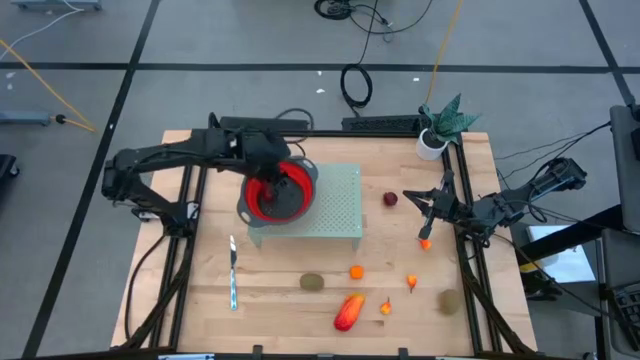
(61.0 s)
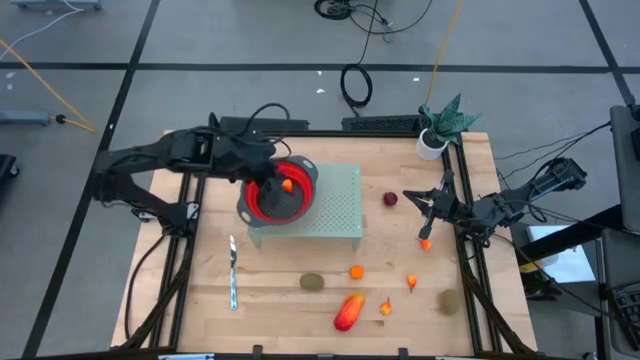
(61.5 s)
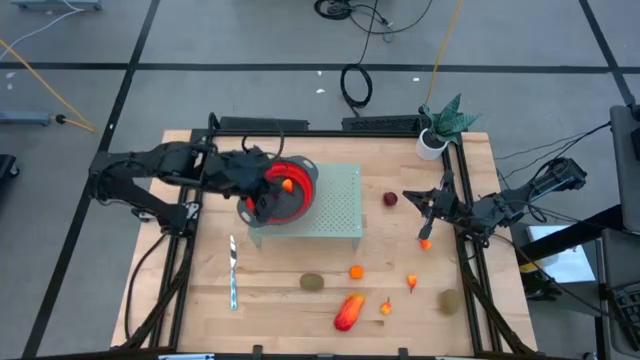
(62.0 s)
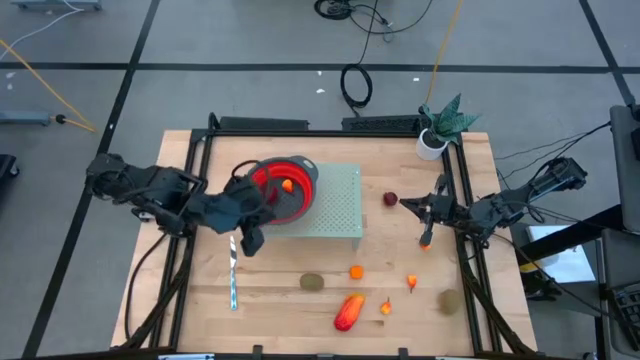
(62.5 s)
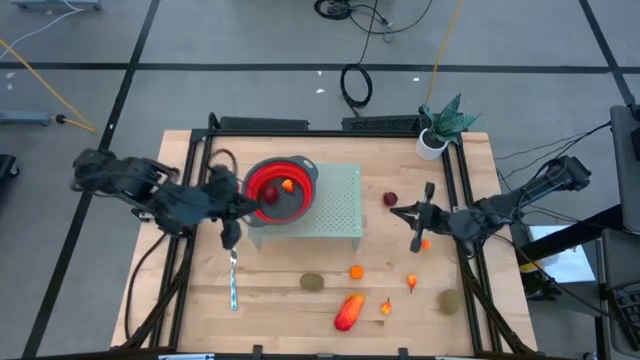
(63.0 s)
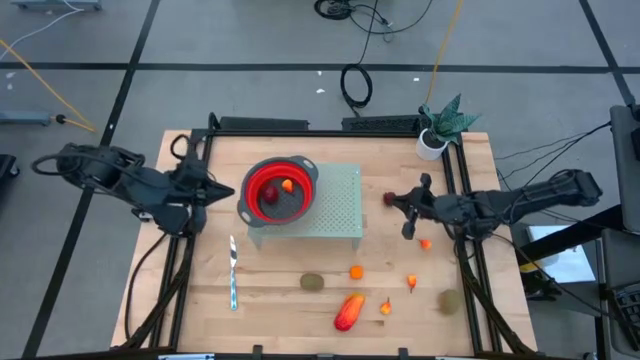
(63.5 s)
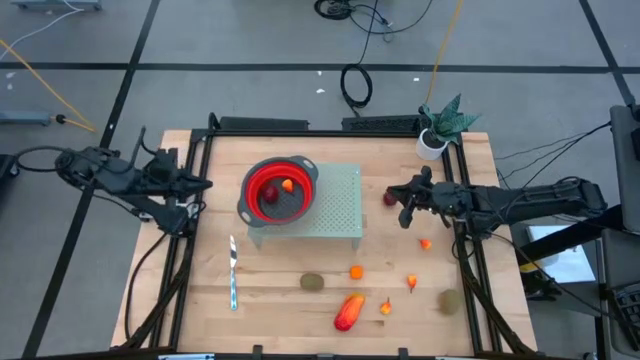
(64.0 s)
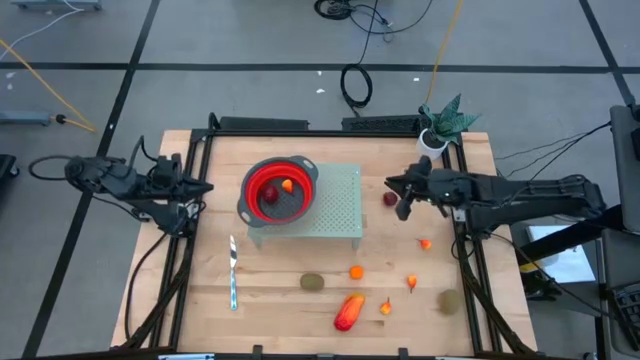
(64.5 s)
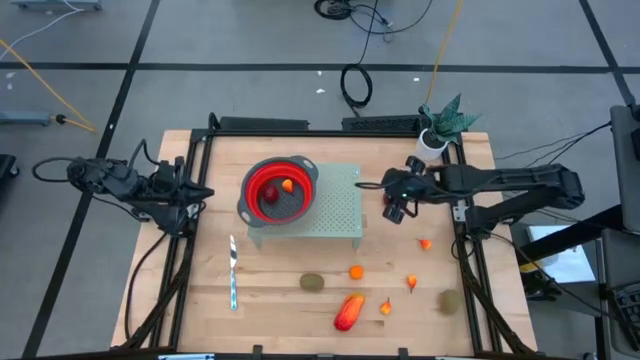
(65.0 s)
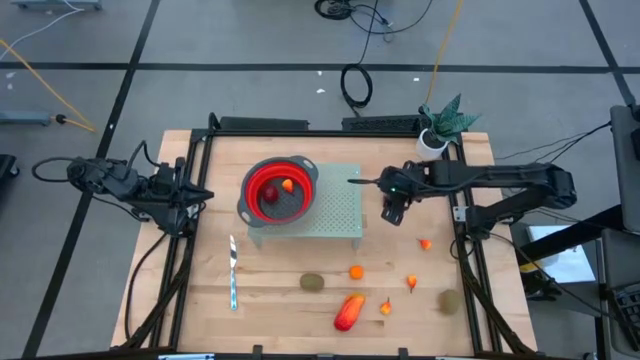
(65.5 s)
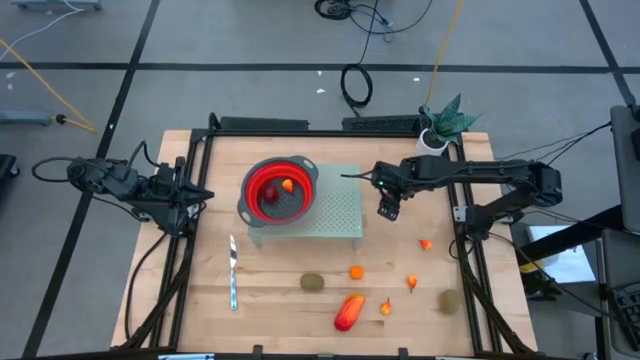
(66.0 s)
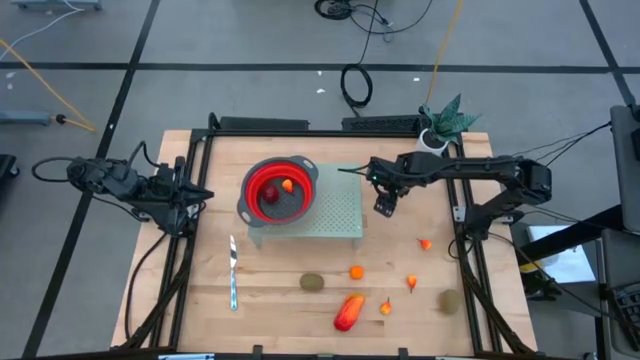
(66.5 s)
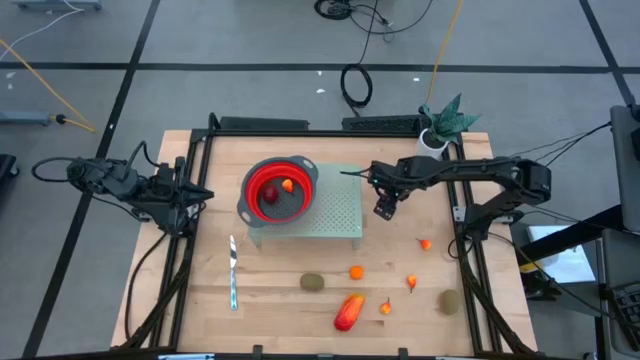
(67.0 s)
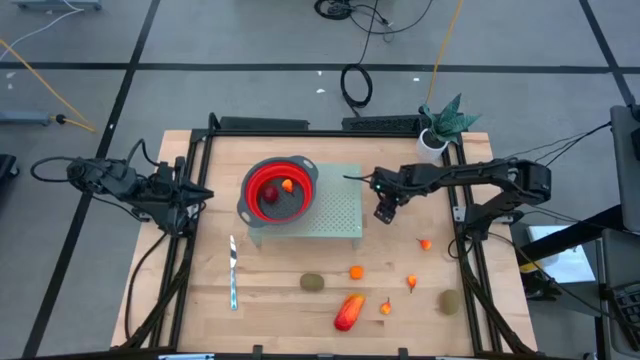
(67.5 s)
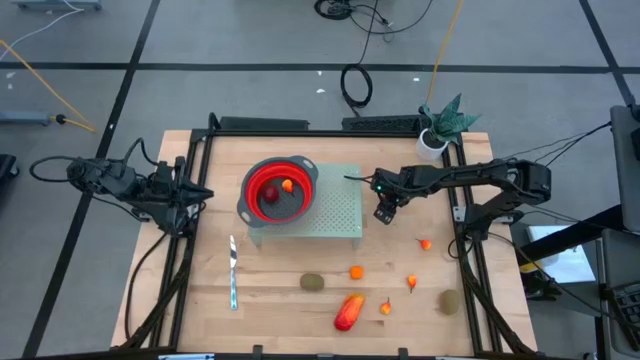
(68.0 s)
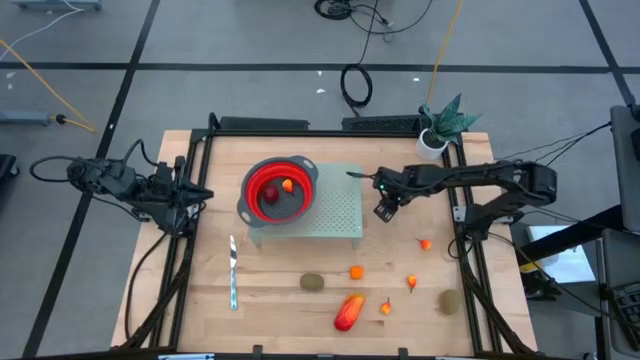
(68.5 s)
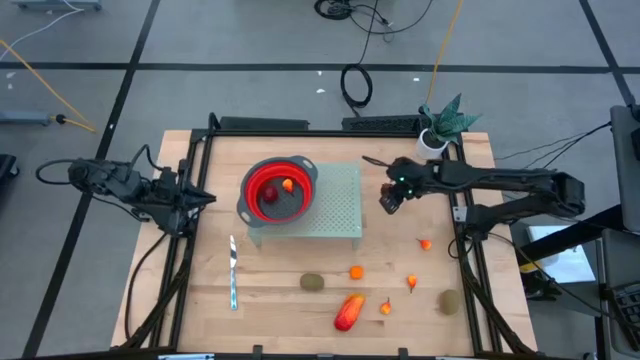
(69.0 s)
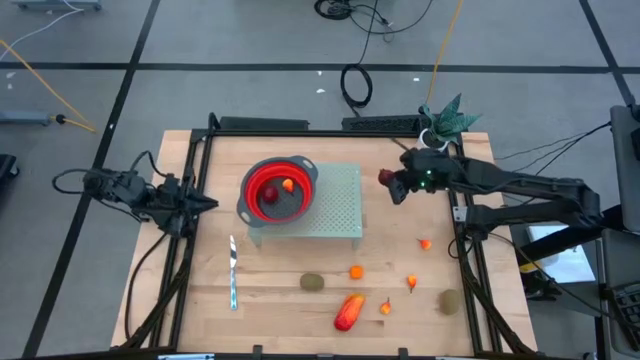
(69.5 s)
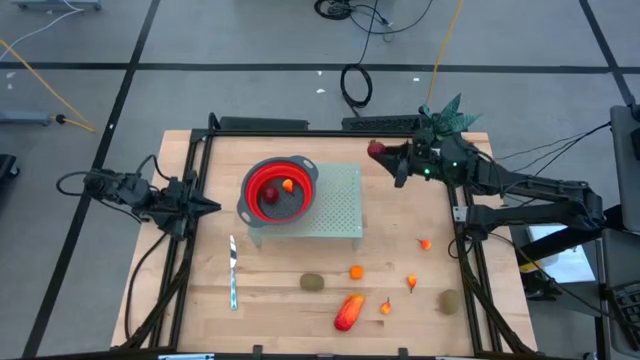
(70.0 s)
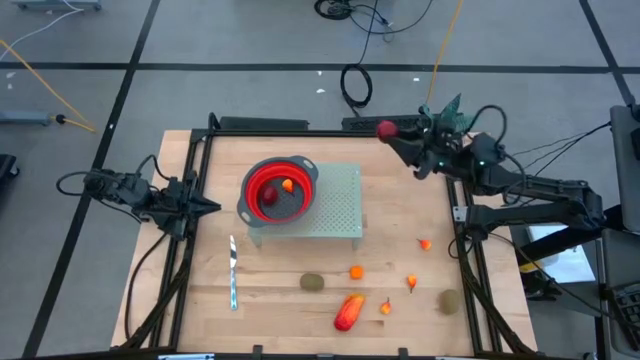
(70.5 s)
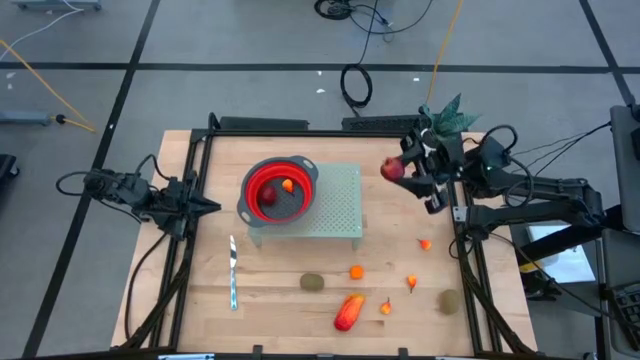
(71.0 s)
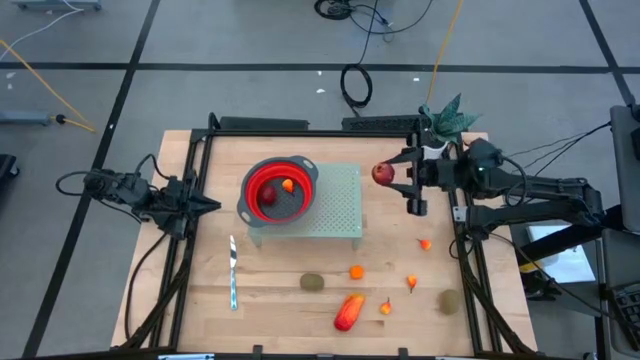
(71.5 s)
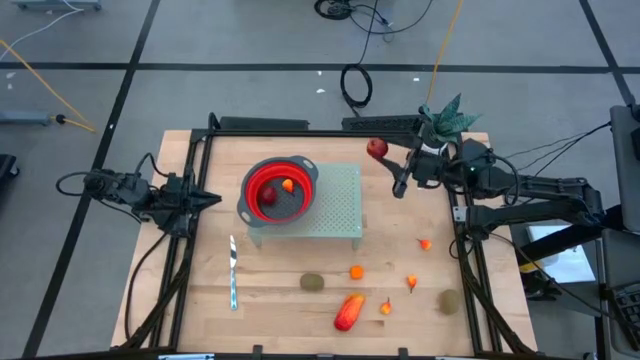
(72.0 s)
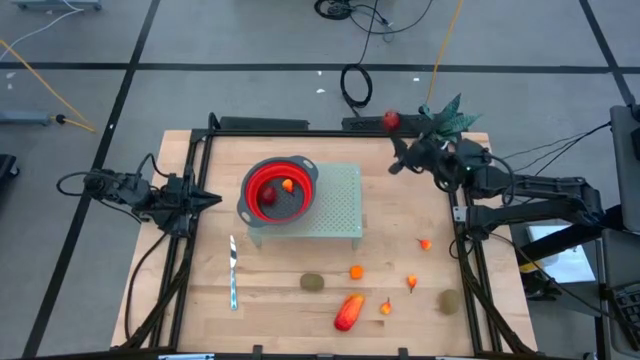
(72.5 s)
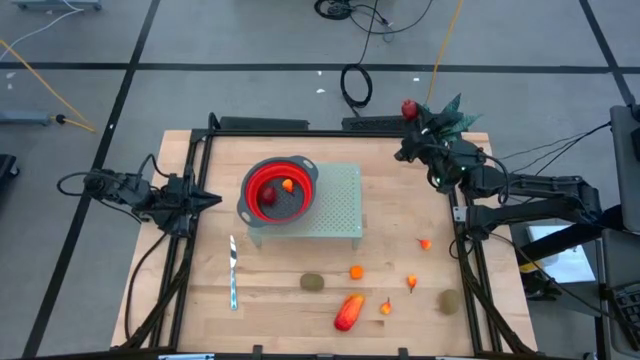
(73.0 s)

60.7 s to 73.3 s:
Task: Pick & Place Fruit
Put the pomegranate into the strainer bowl on the shelf

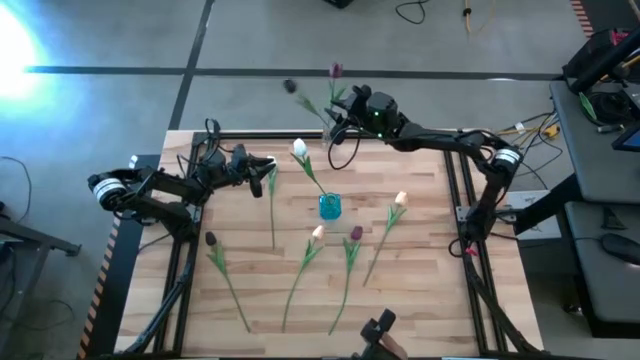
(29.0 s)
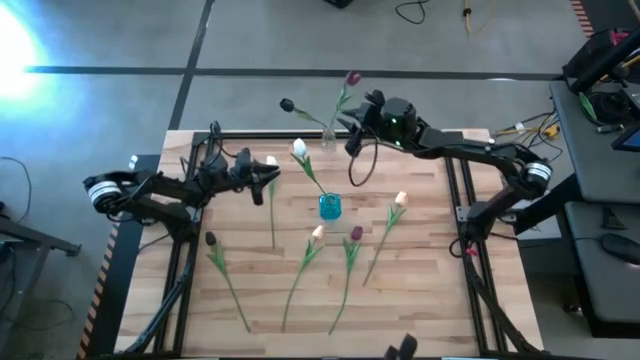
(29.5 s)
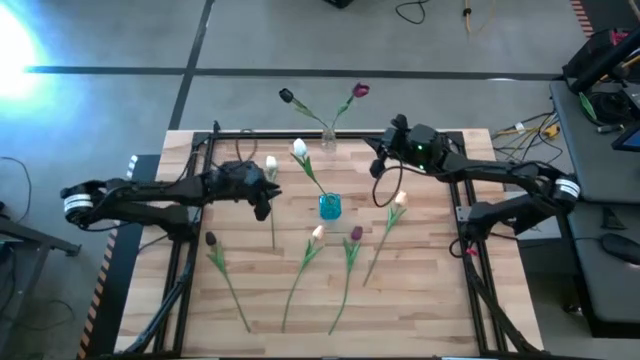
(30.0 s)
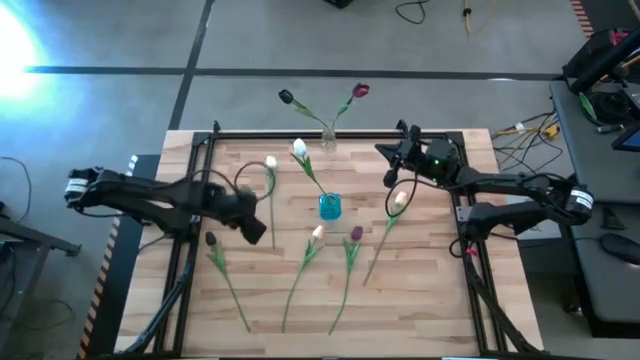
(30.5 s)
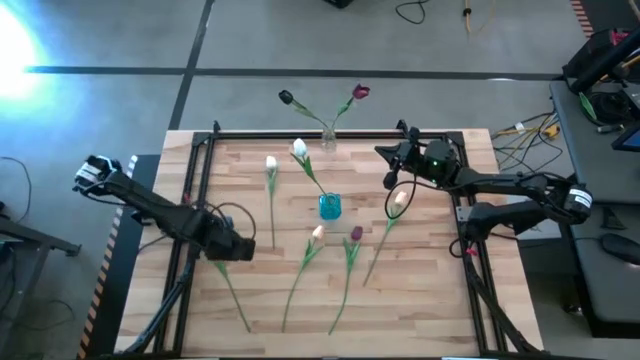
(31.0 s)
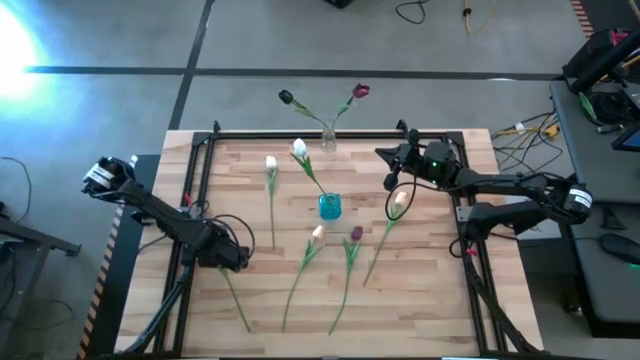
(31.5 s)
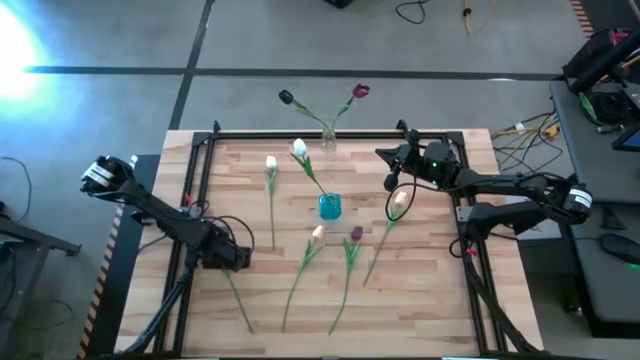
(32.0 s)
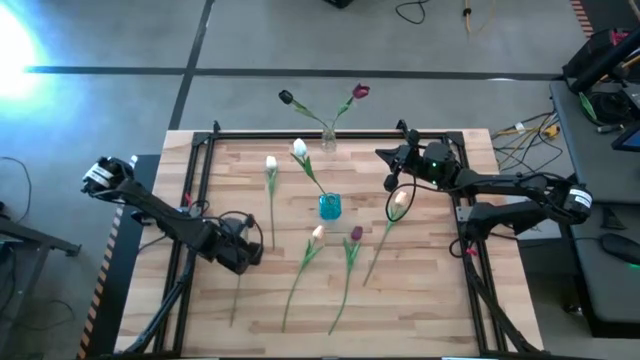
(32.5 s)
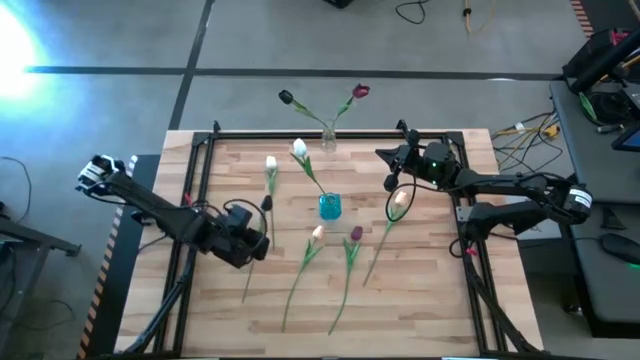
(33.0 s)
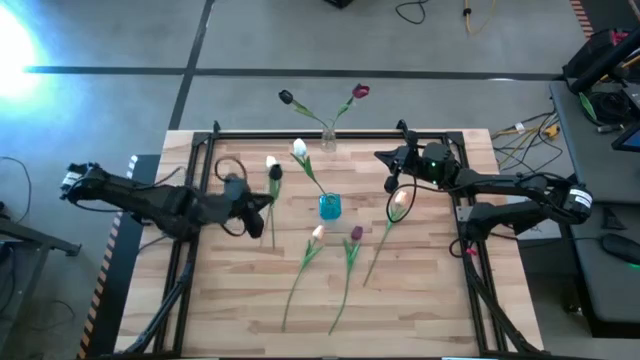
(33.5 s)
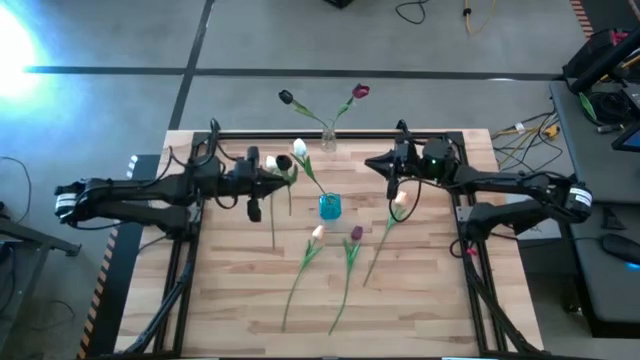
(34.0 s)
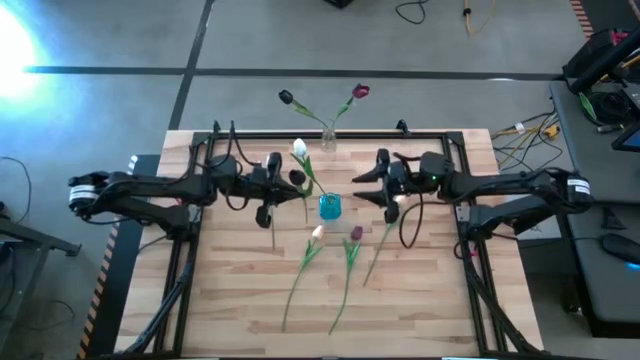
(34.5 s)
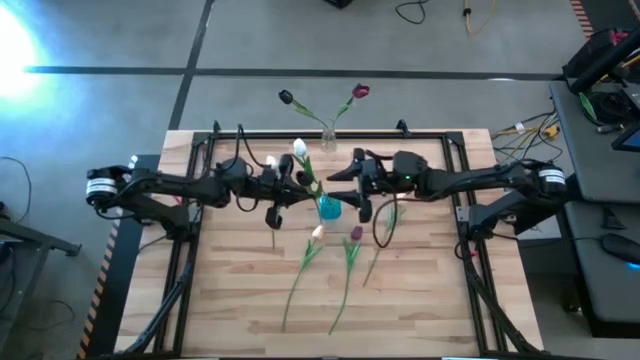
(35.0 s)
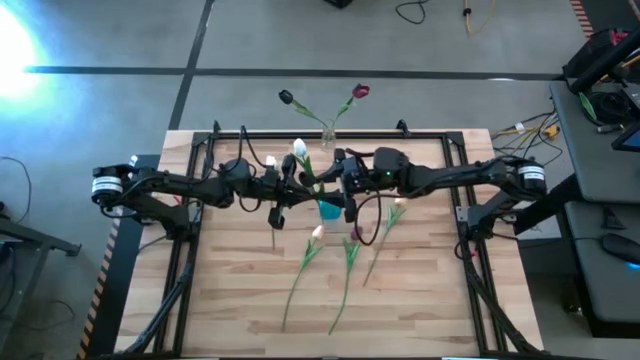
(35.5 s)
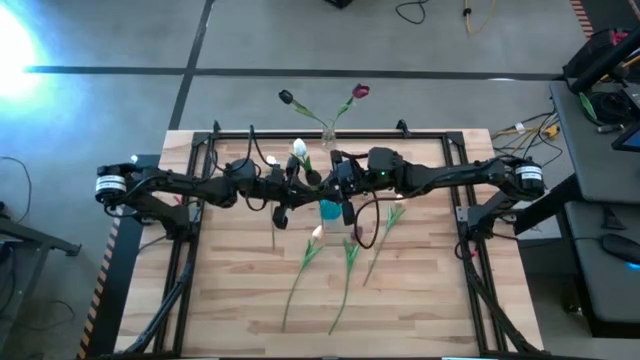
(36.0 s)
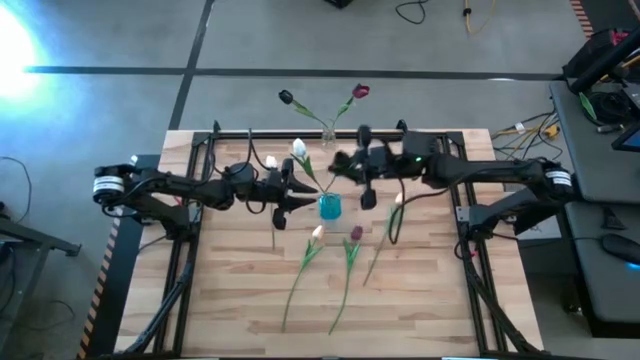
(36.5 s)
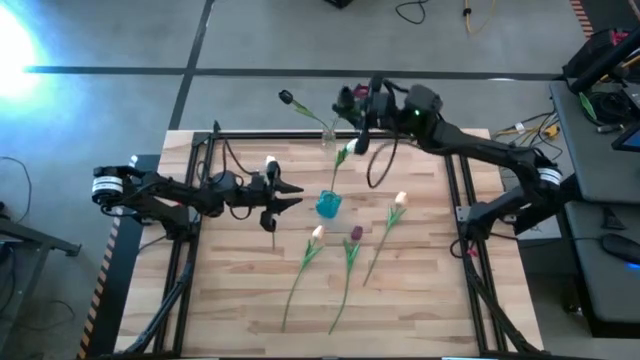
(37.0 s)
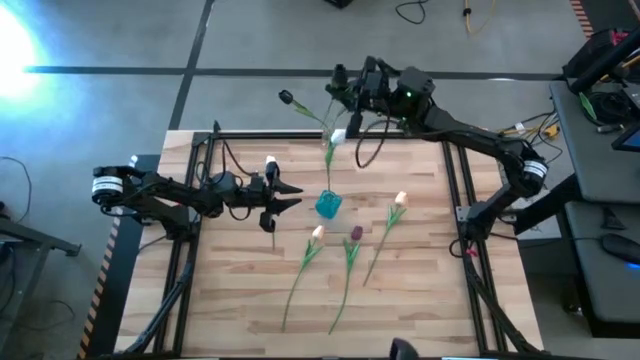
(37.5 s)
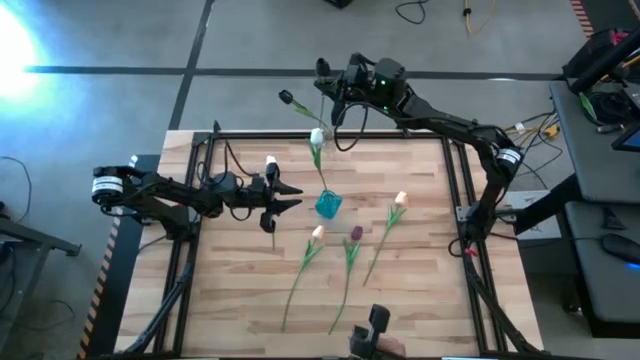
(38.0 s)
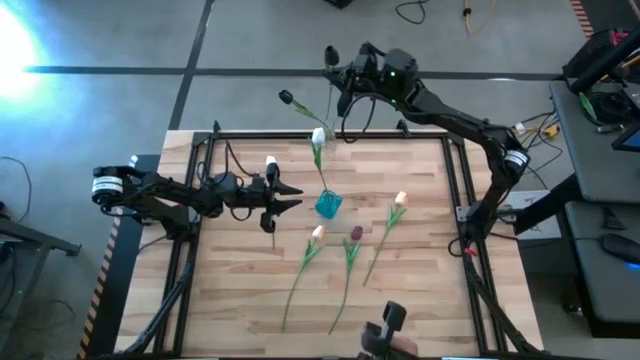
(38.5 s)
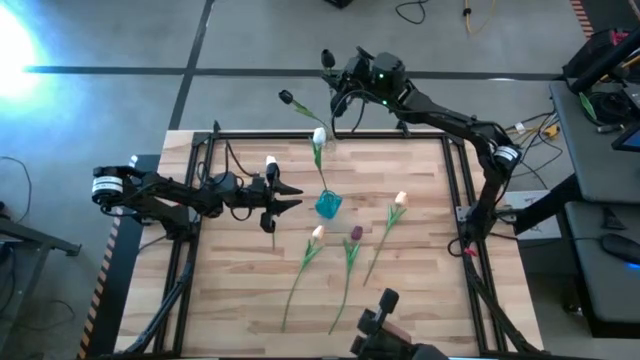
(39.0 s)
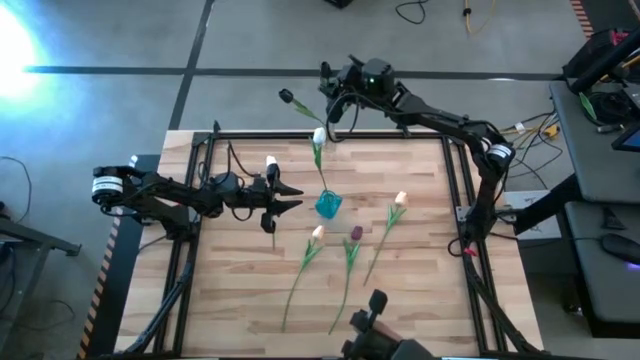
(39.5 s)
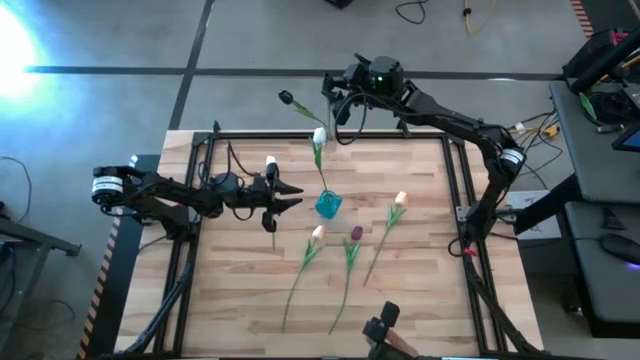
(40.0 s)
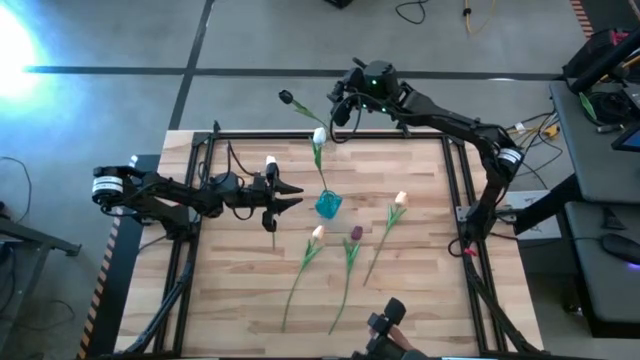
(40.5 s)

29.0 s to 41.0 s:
Task: Sort flowers into vase by color
Put the black tulip into the transparent vase
